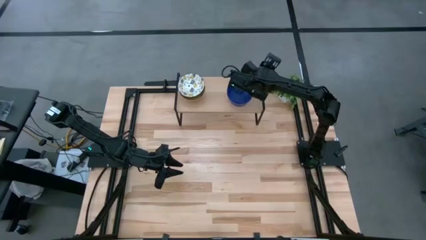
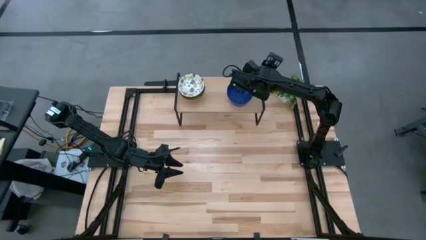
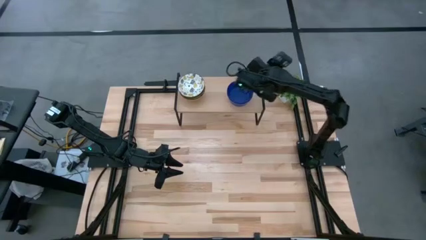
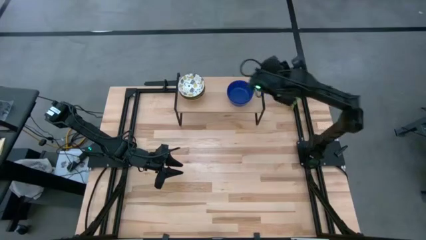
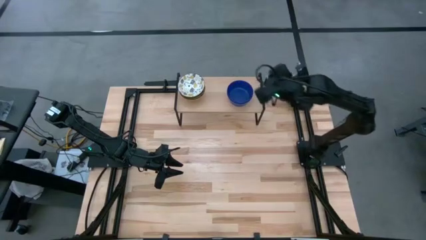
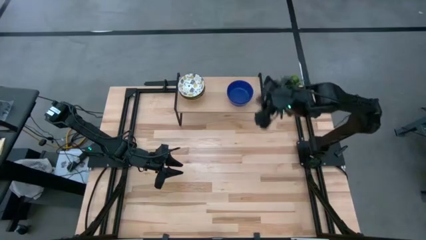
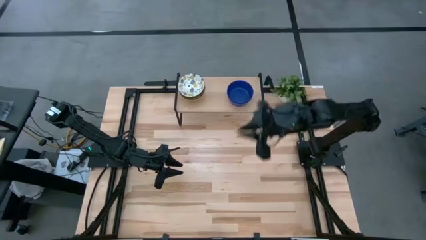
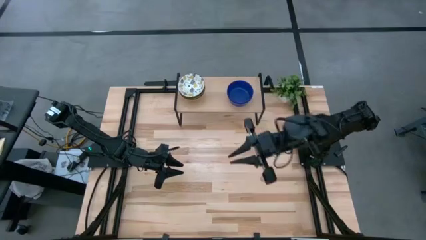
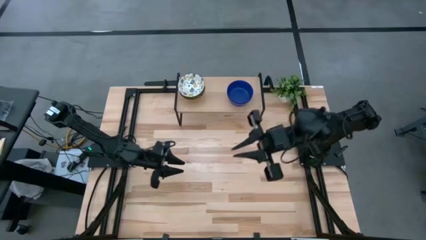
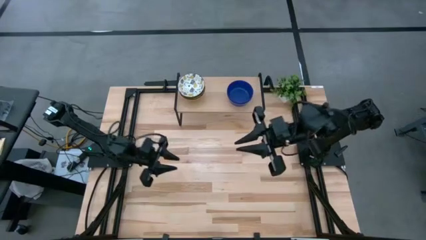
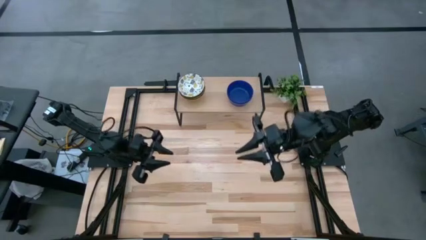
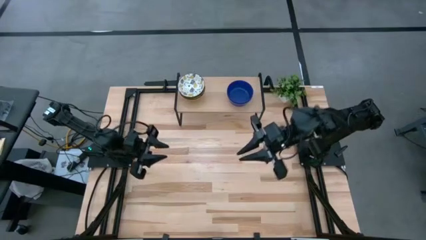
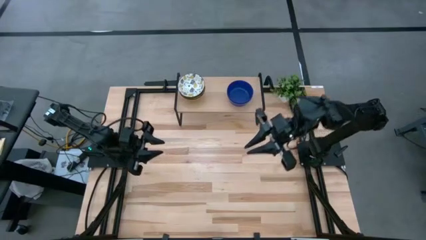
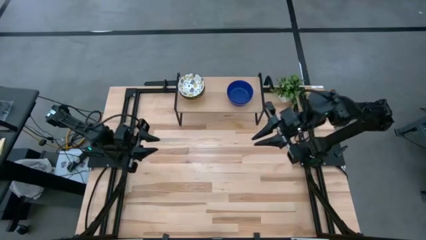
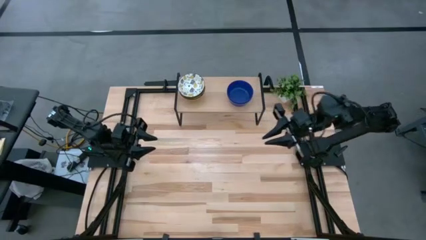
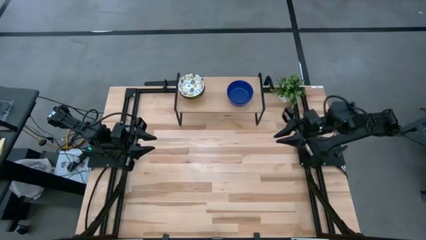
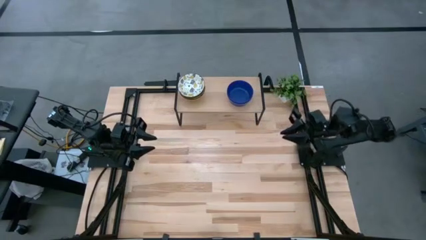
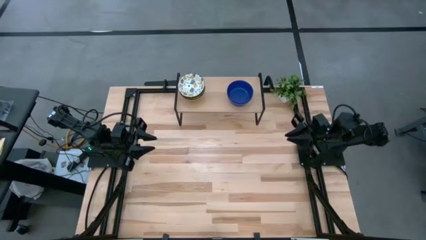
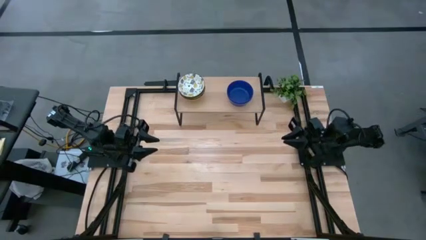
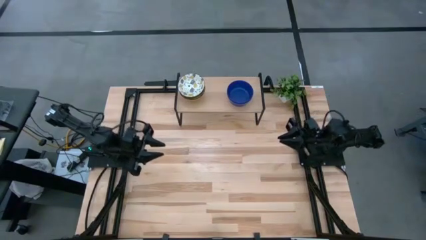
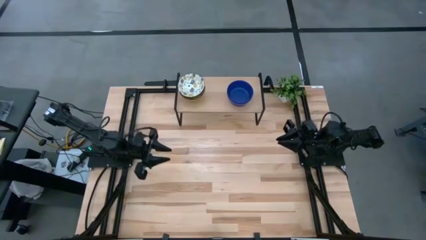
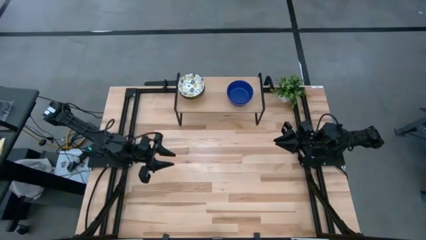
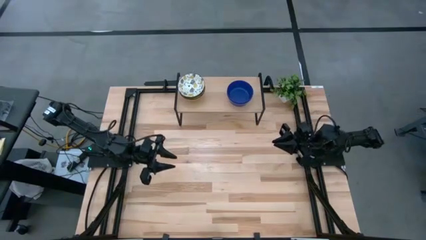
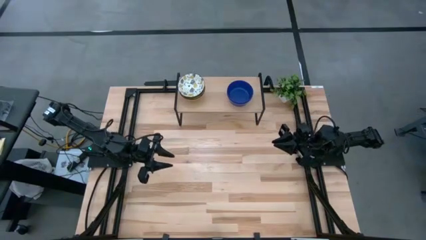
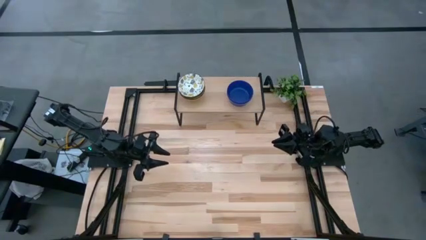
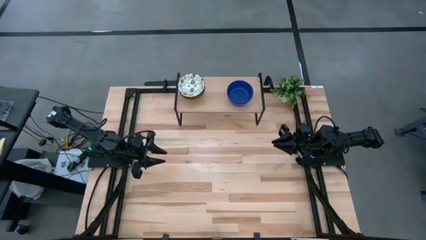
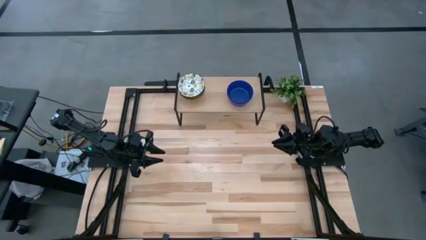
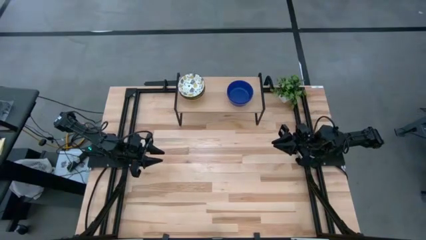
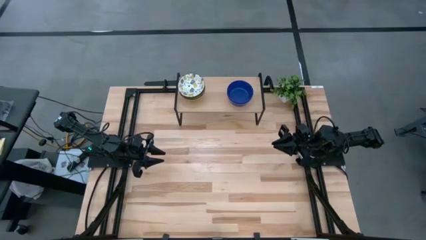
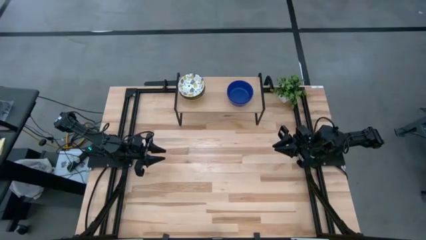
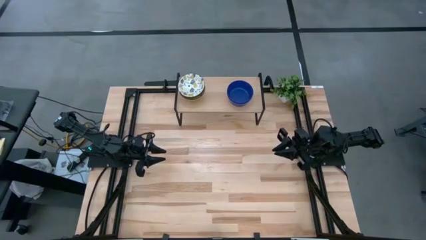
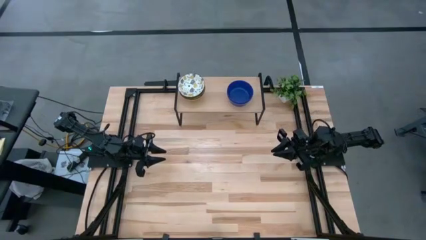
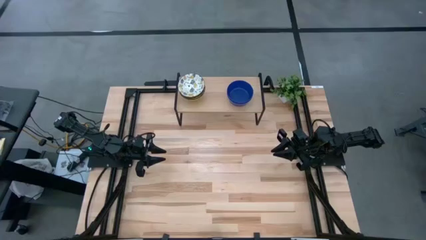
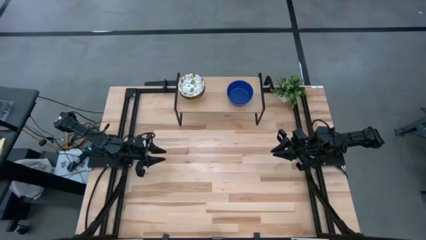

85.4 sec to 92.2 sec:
Task: Pick & Place Mini bowls
Return to Home Position

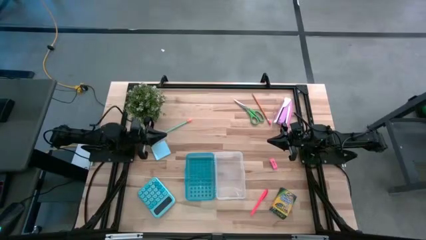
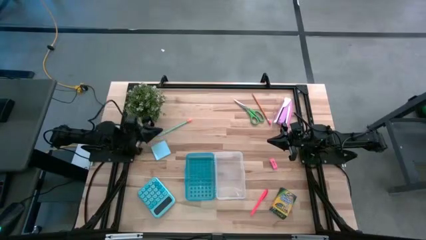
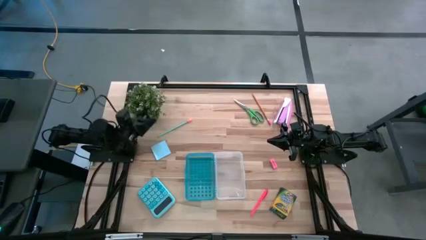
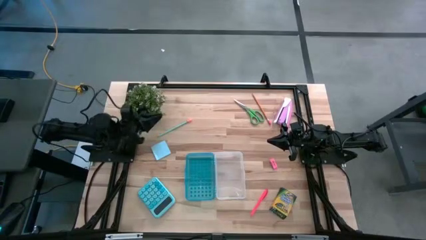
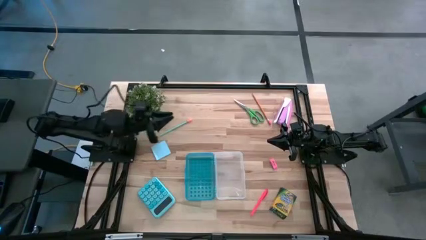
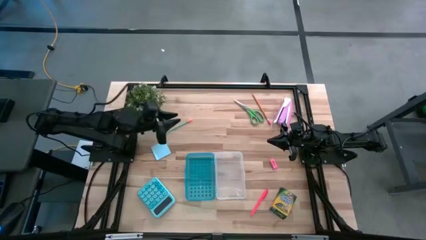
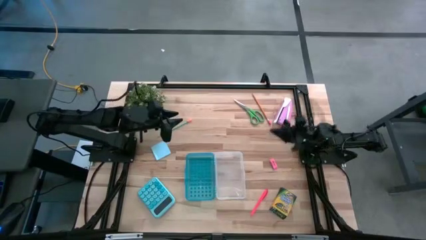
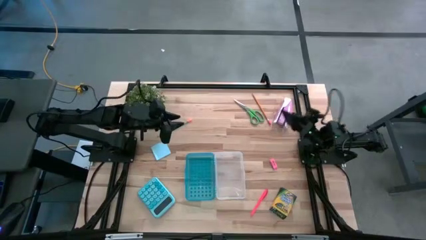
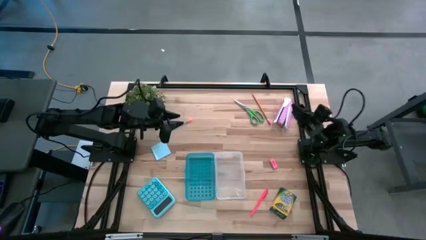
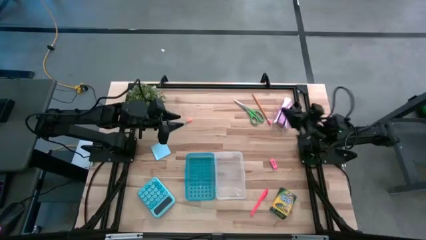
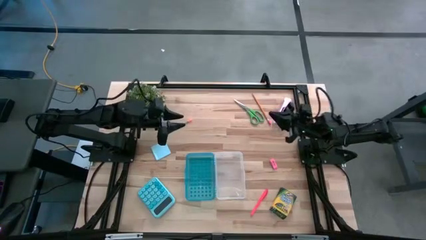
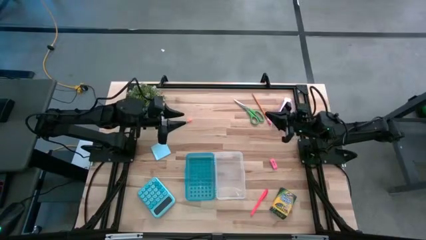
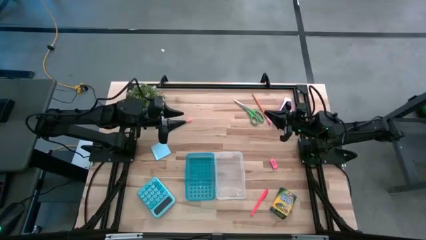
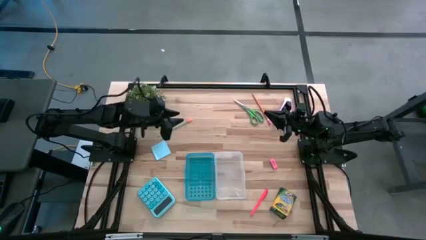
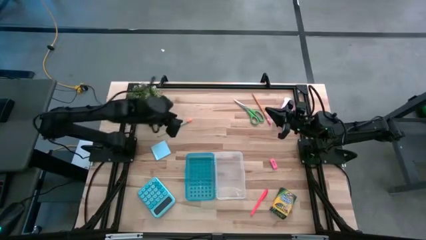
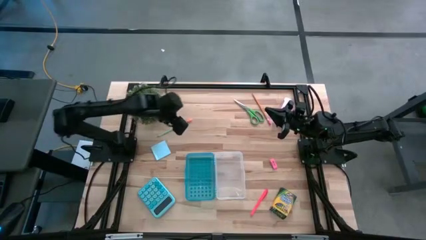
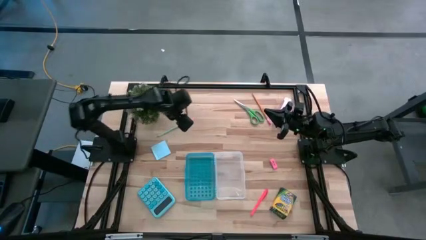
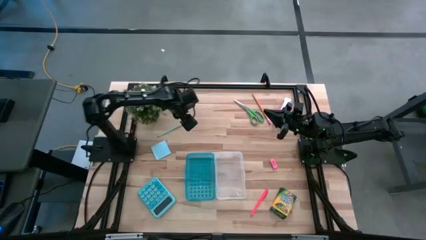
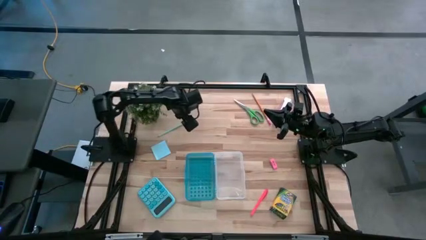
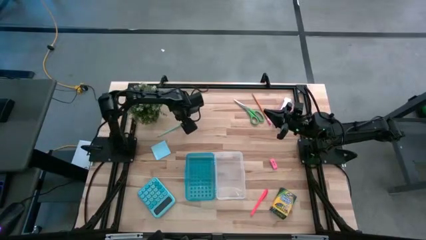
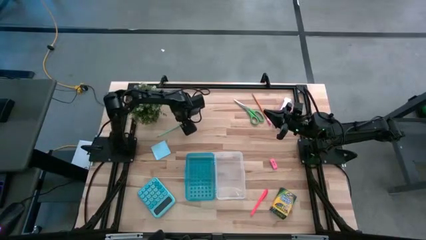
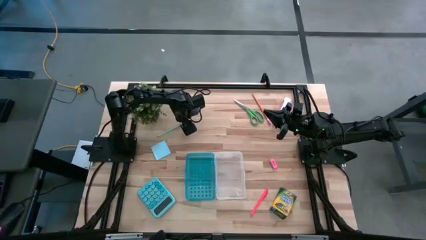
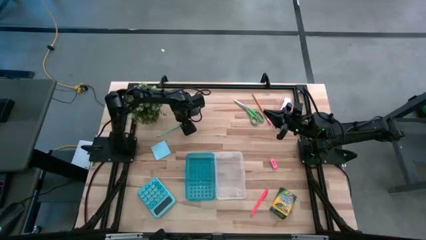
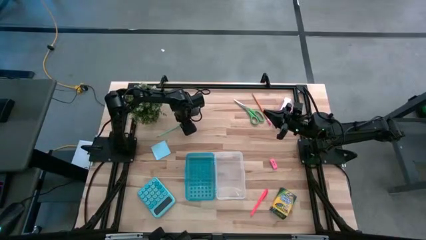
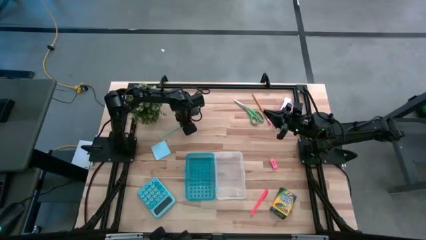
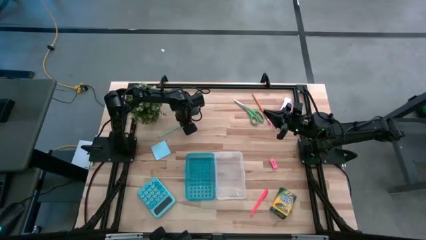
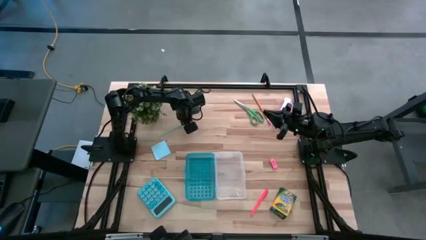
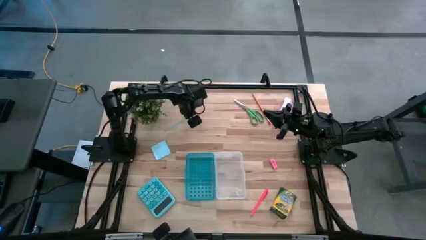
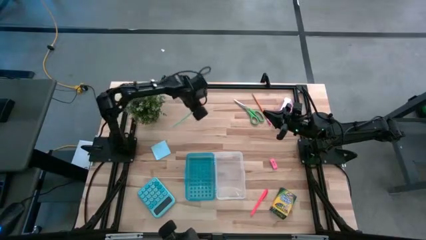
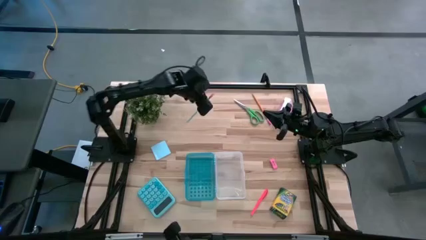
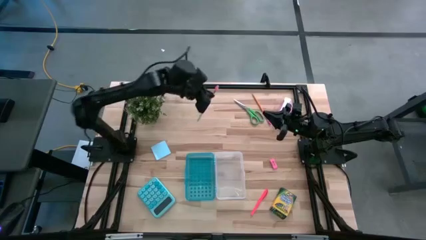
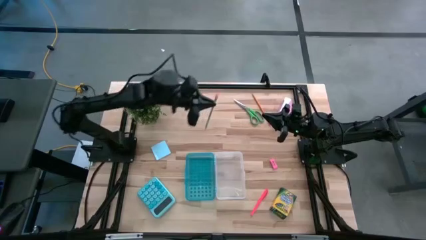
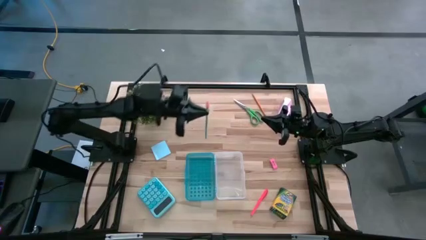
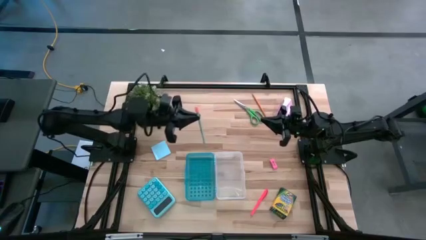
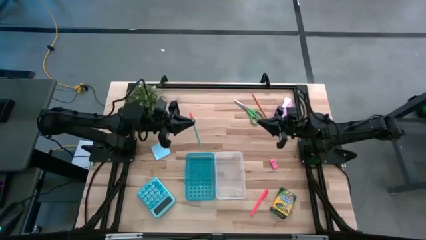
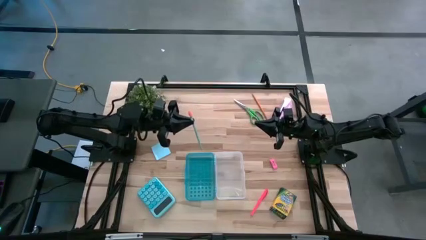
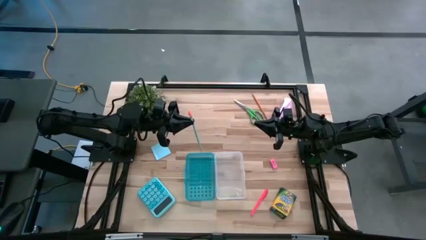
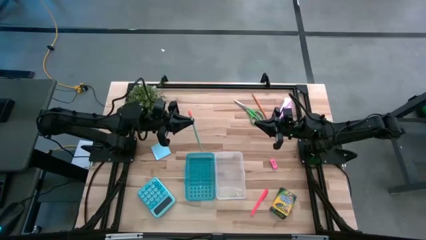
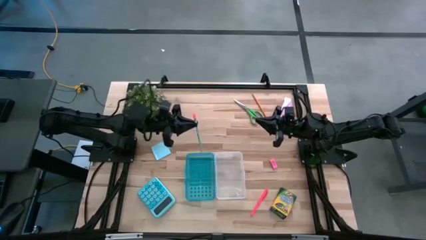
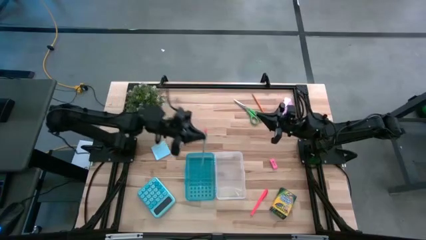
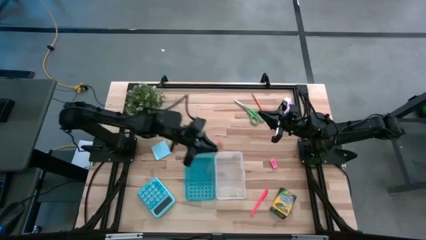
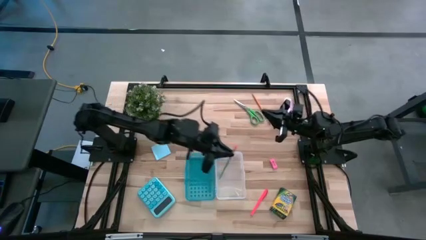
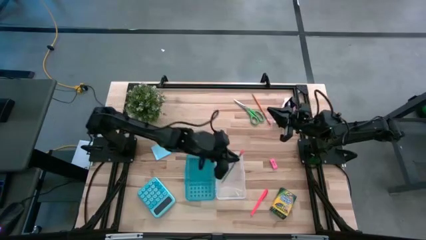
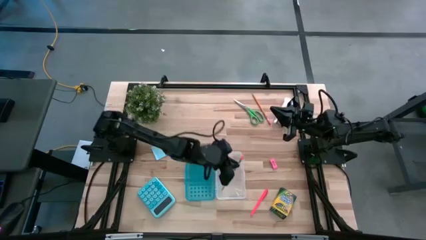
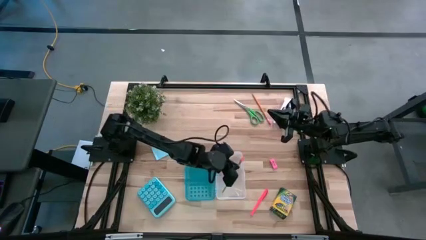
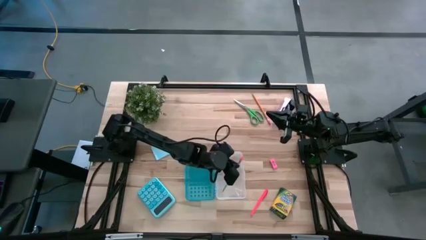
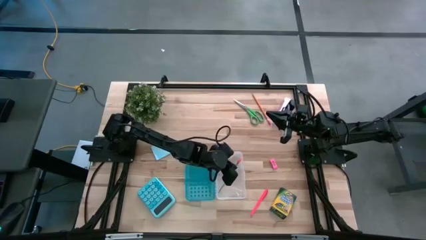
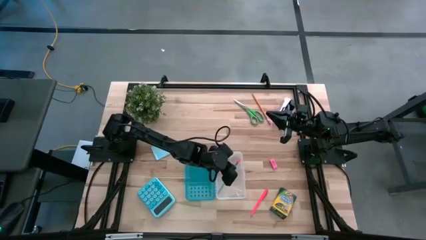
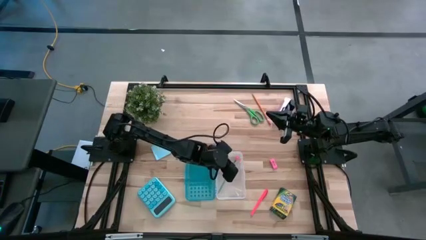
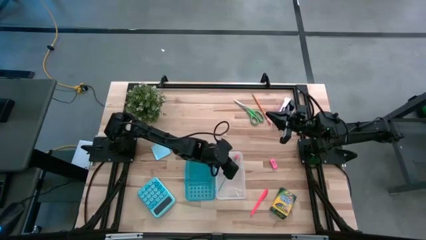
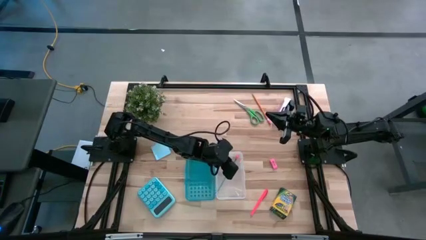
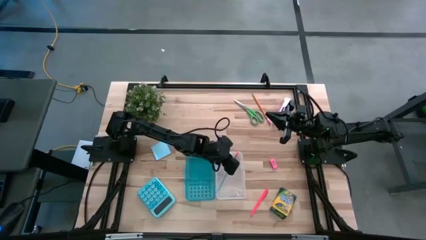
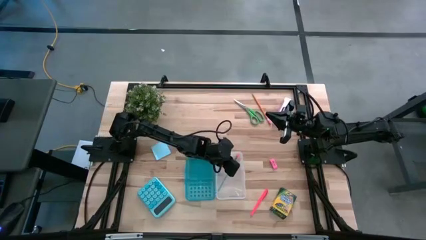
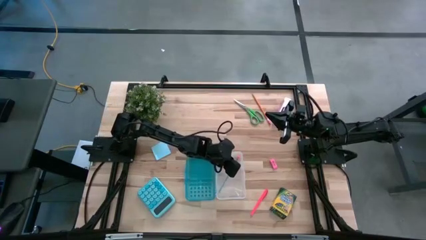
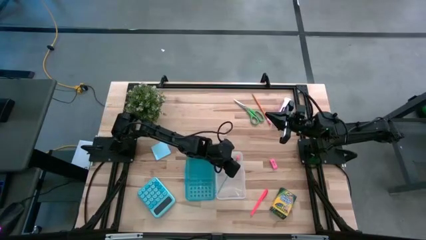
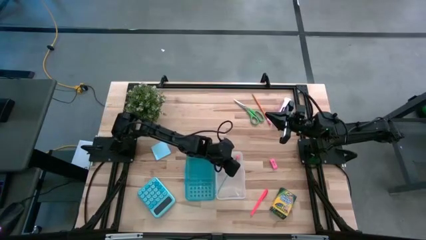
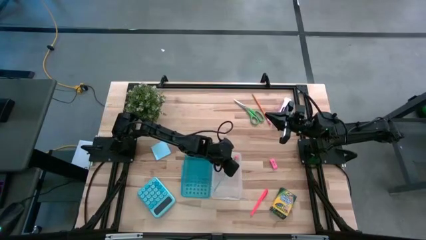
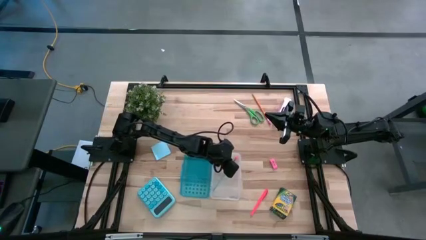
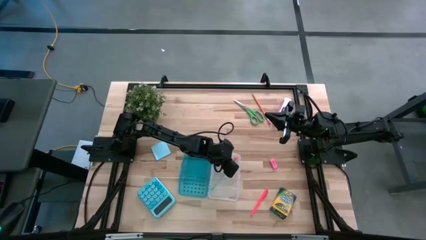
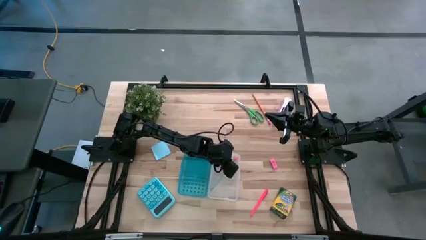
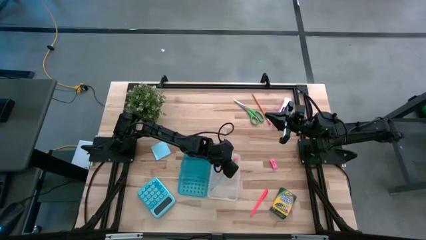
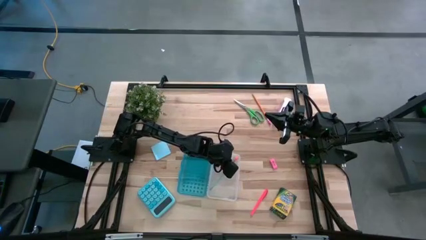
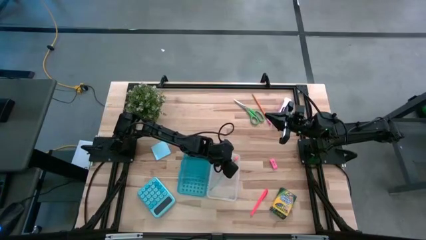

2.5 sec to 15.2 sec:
Task: Pack school essentials
Put the blue pencil into the blue supply box
